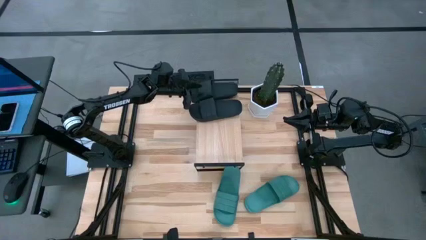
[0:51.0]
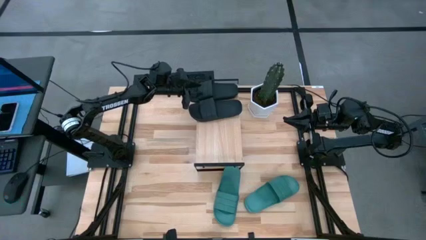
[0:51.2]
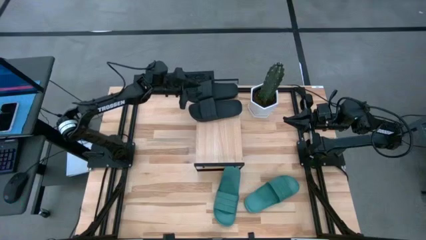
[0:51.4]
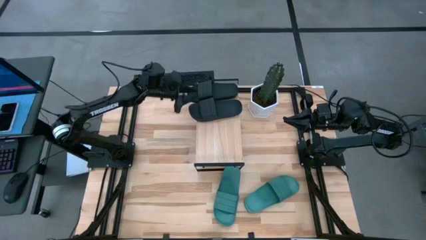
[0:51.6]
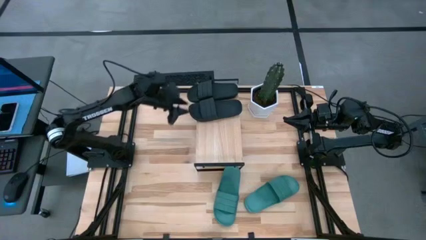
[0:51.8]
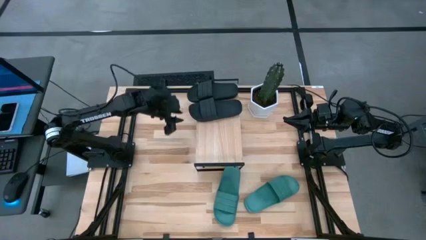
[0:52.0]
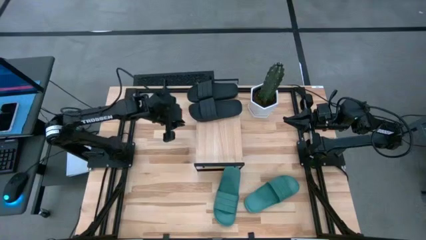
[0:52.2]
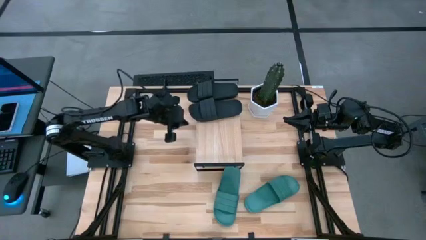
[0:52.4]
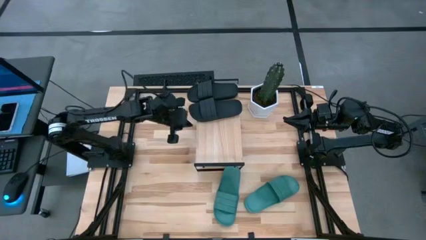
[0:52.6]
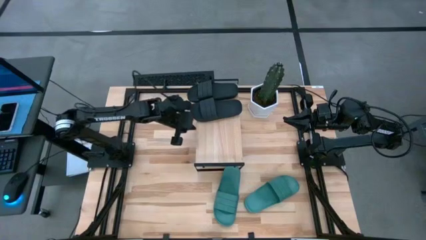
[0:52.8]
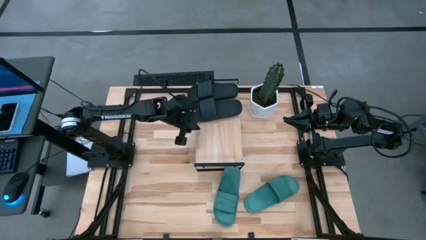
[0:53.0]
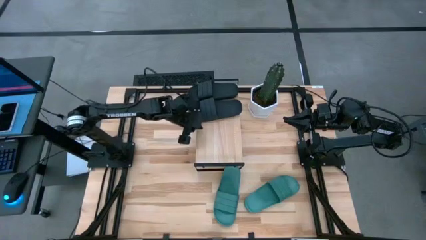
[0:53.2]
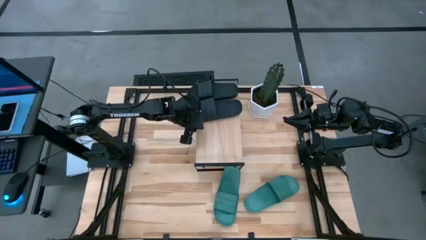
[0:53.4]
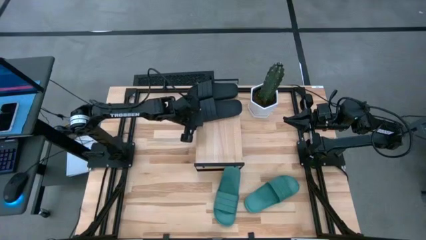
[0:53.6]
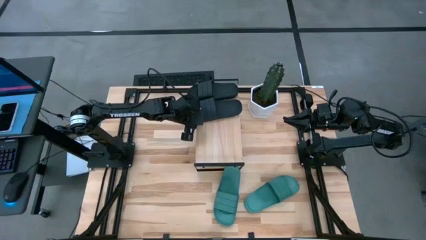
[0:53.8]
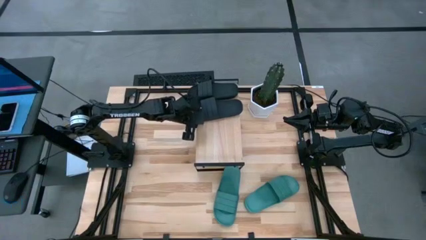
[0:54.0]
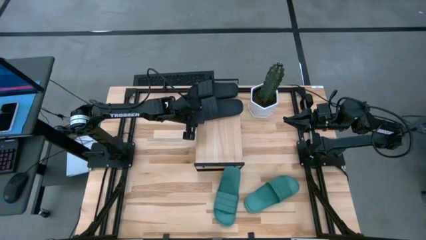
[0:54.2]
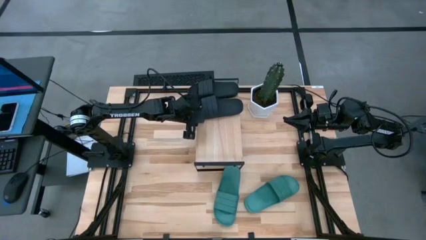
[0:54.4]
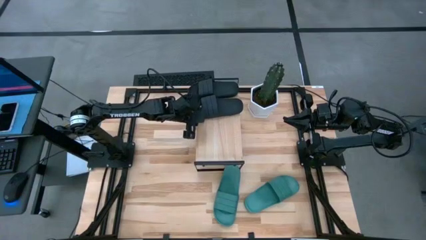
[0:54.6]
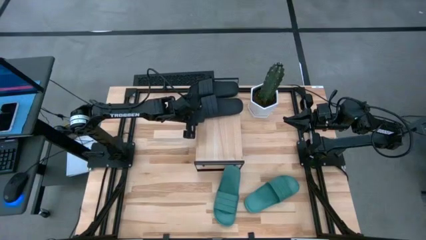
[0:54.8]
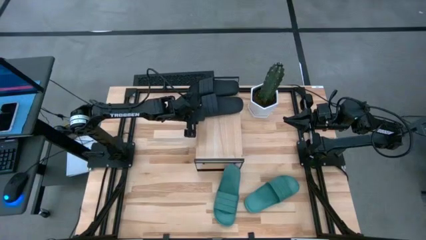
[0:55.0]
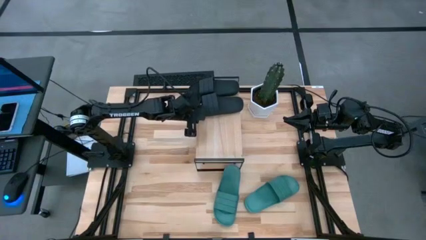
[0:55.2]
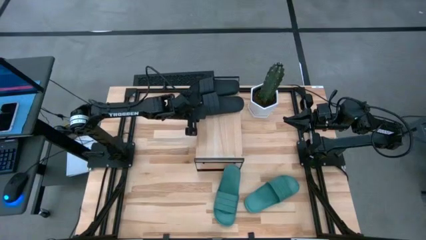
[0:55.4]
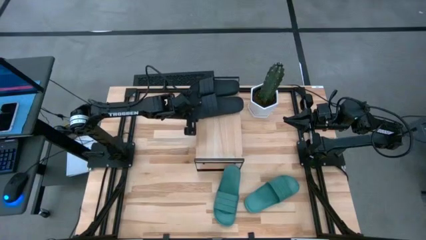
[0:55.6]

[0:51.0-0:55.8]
Task: Pick and place slides into the shelf
Adjust the black slipper

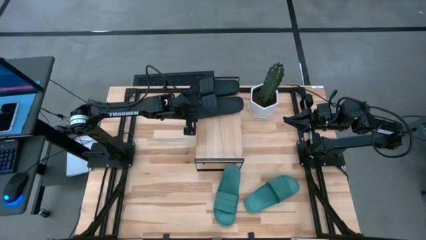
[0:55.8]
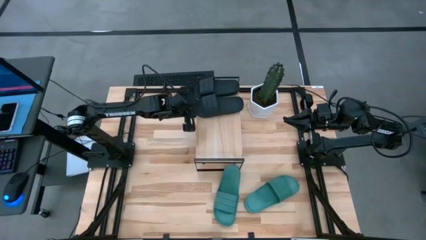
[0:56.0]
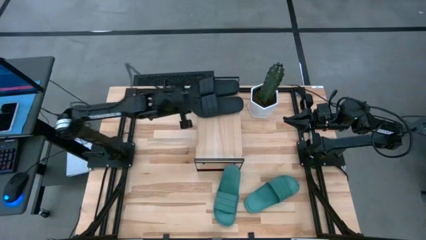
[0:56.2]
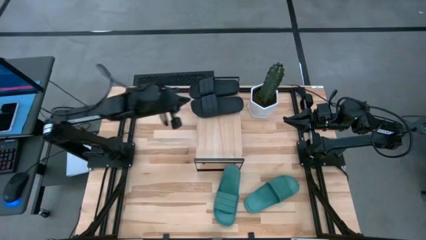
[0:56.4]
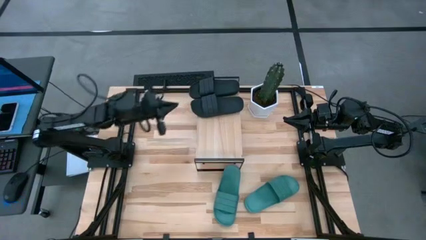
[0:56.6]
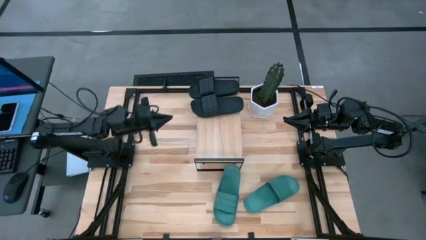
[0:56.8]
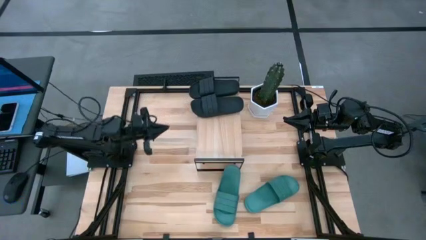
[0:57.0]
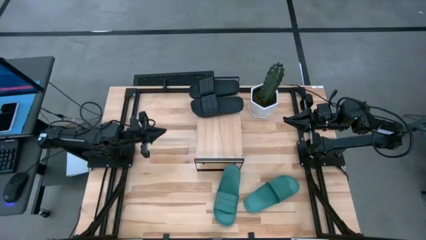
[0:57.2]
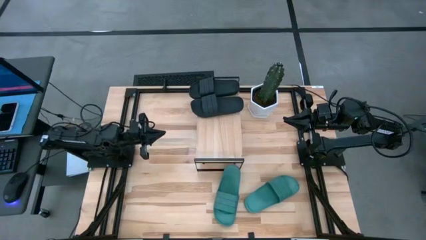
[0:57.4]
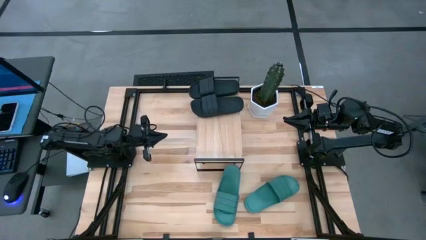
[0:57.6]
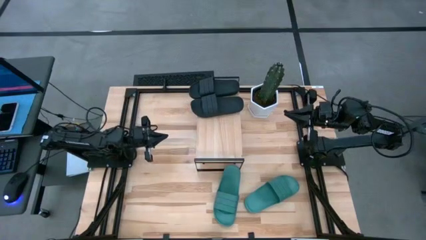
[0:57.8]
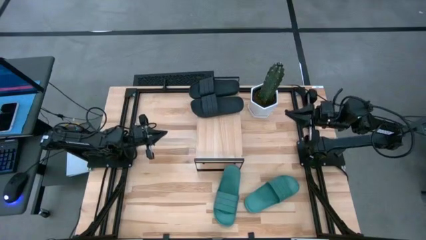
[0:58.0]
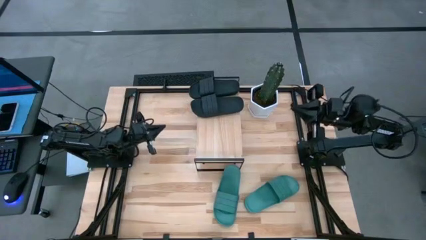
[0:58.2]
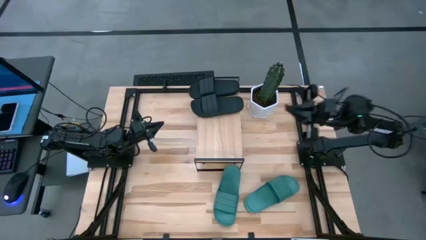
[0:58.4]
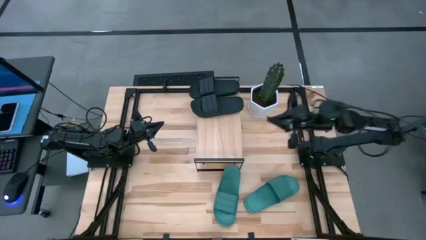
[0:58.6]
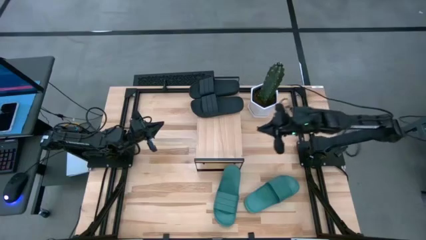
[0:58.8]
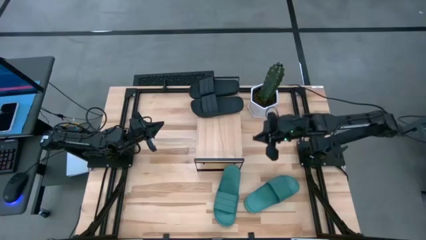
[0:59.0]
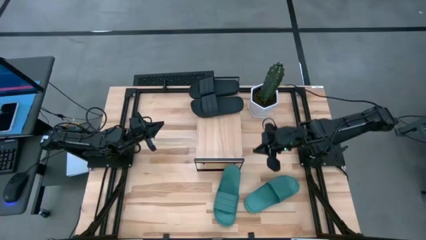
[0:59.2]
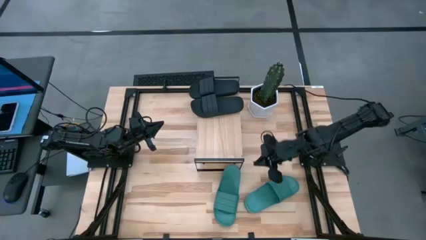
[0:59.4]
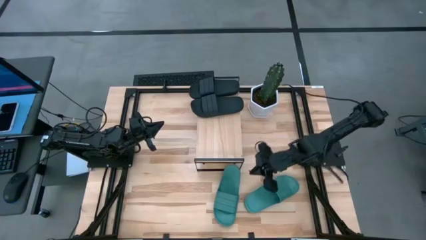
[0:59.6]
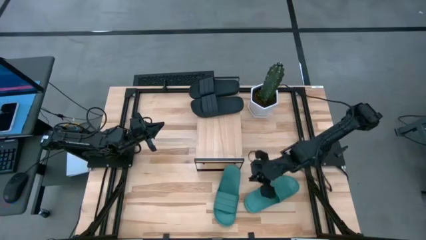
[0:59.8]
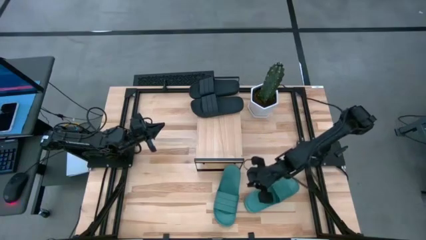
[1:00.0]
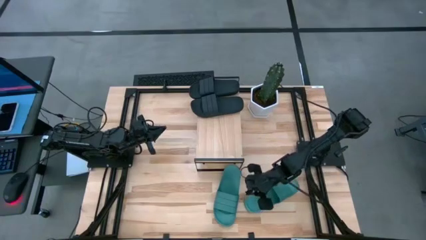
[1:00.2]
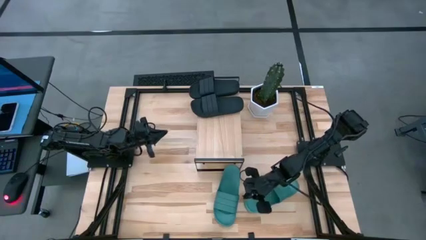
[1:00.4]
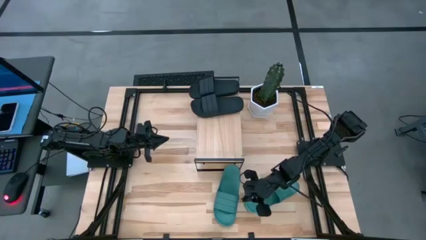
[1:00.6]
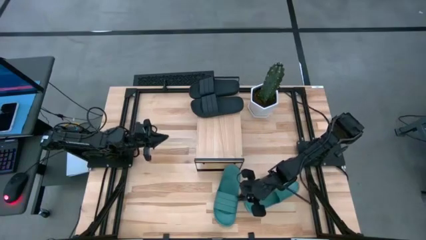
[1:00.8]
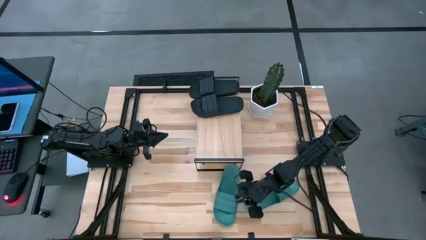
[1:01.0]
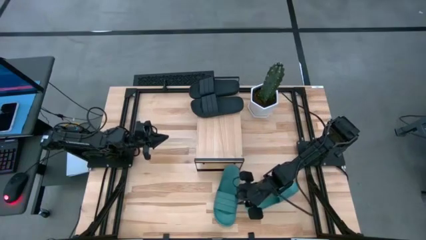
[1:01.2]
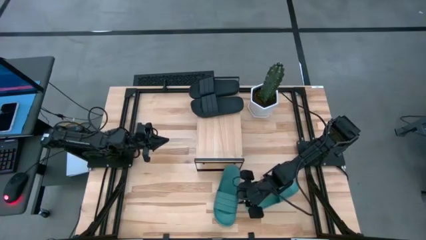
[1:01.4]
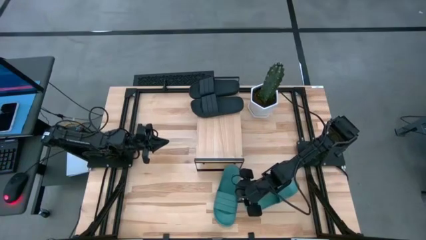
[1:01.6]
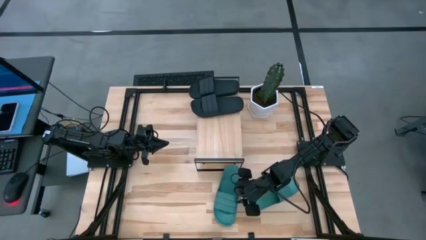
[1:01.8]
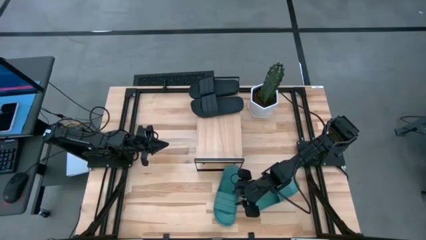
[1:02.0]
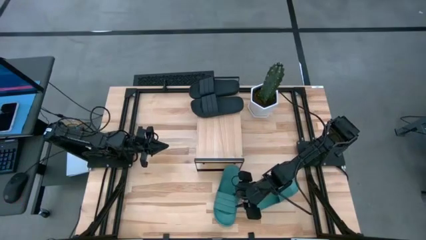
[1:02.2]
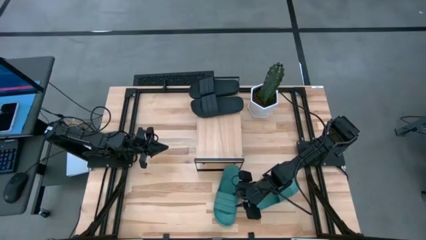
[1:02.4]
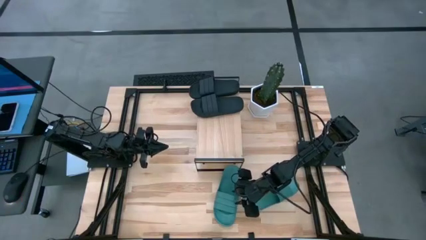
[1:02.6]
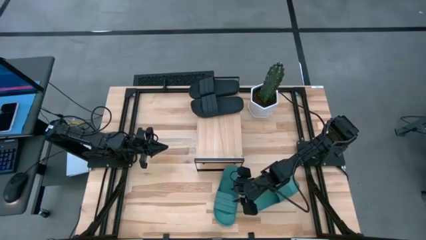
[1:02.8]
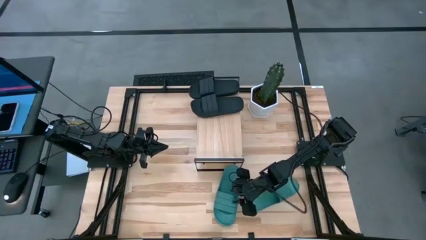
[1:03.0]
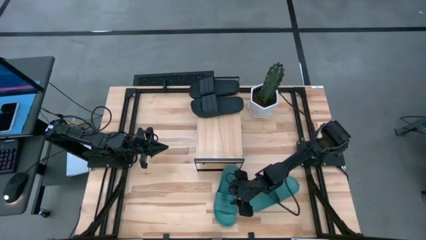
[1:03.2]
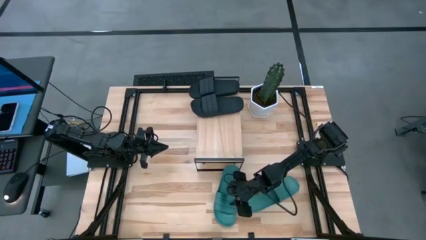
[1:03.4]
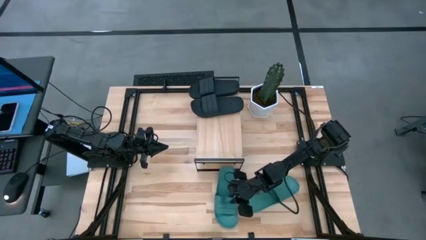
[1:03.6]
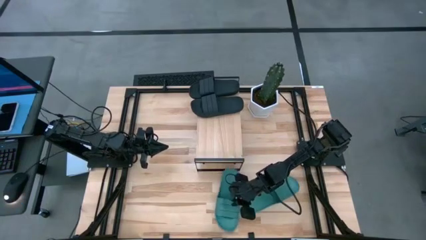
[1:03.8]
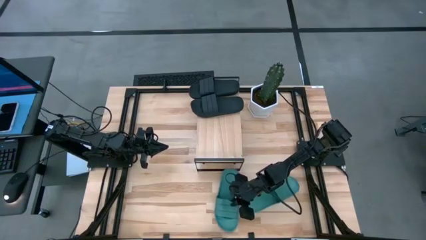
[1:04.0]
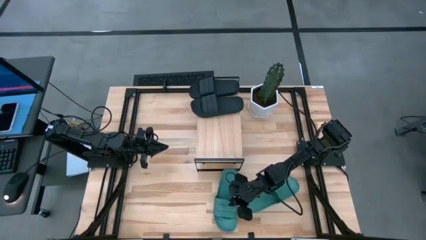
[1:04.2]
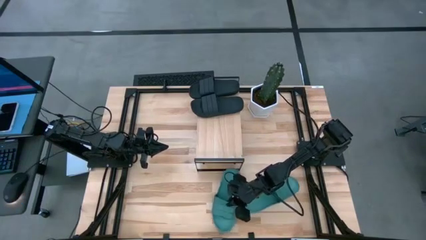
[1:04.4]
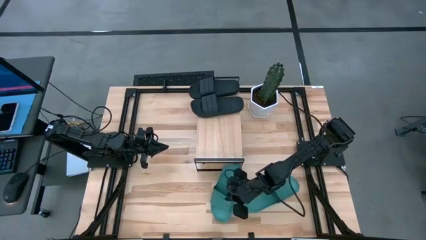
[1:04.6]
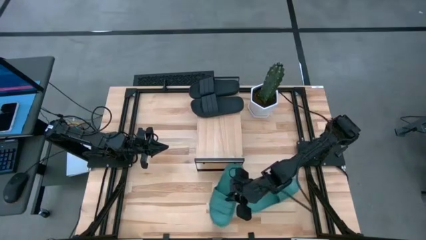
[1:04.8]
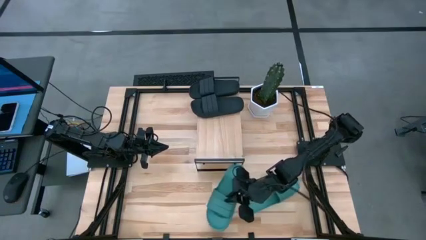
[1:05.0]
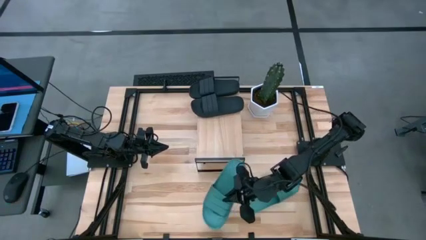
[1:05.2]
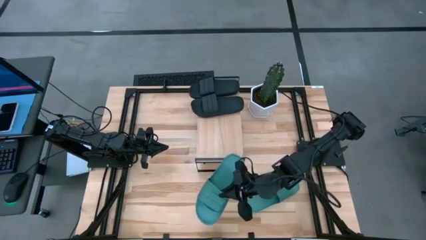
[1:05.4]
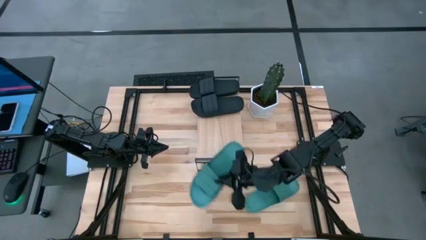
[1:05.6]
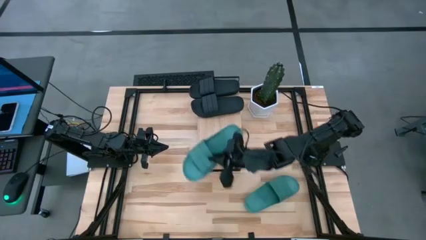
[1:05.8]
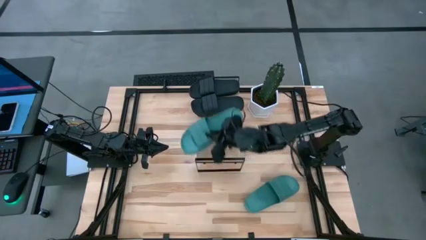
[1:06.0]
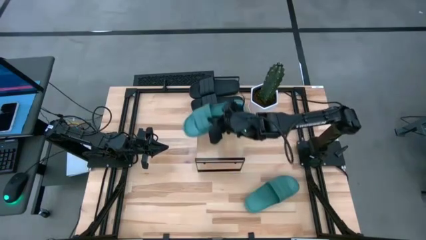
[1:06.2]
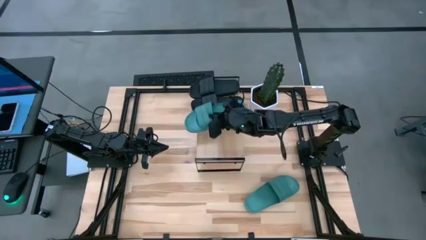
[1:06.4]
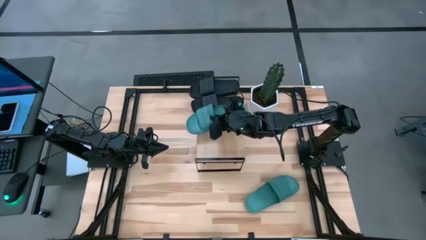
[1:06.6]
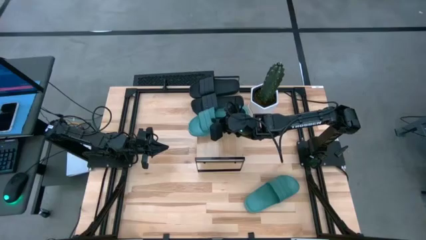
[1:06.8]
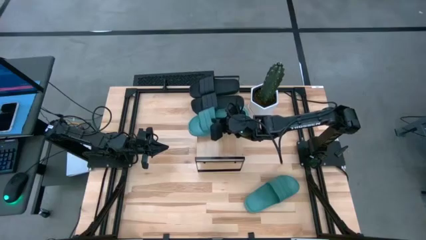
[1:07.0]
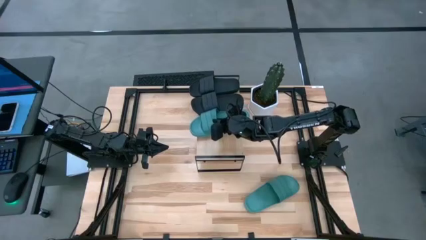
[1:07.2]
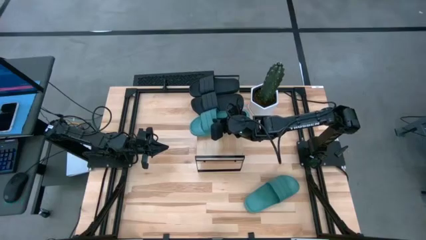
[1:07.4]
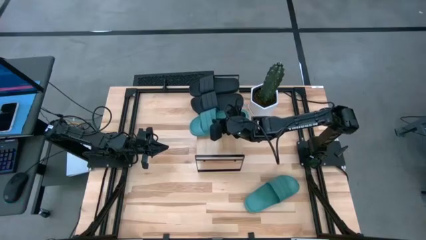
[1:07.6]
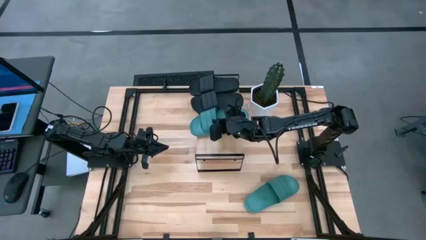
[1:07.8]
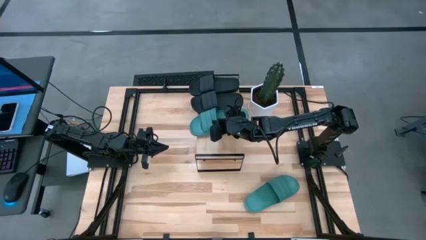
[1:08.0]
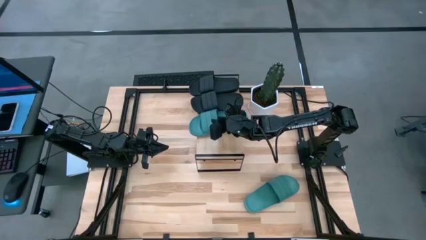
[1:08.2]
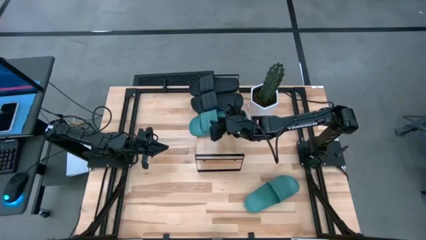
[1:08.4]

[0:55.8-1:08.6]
Put the left green slipper on the shelf
